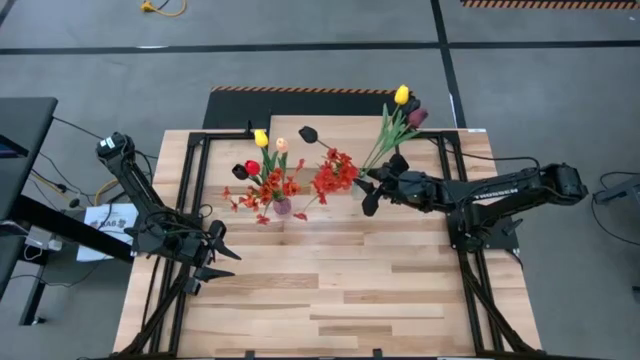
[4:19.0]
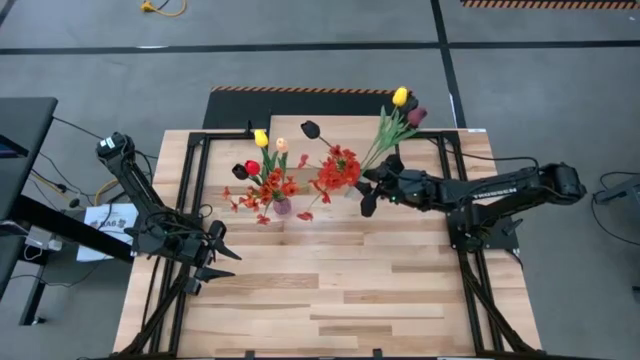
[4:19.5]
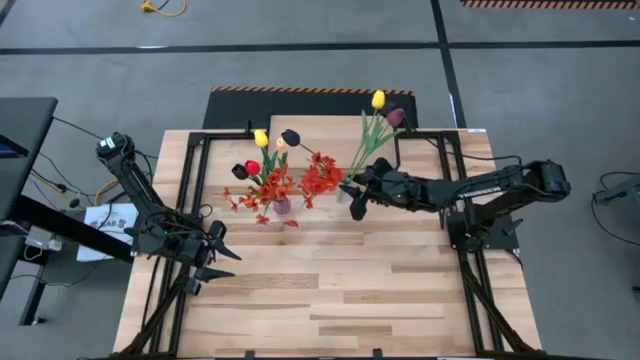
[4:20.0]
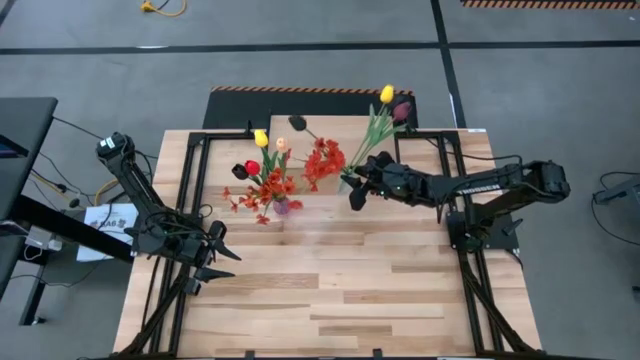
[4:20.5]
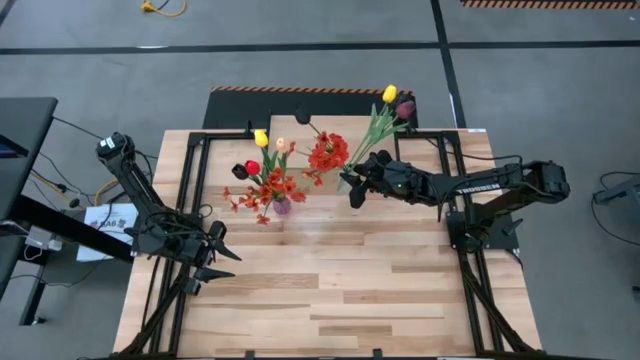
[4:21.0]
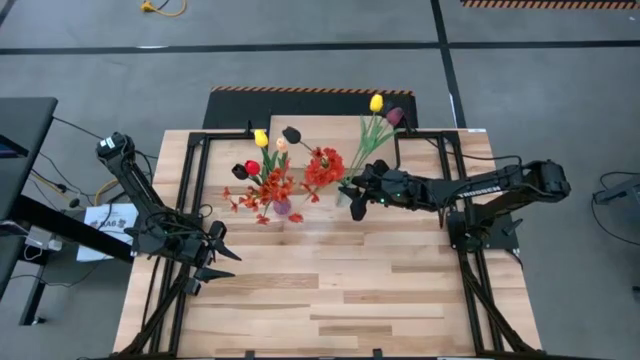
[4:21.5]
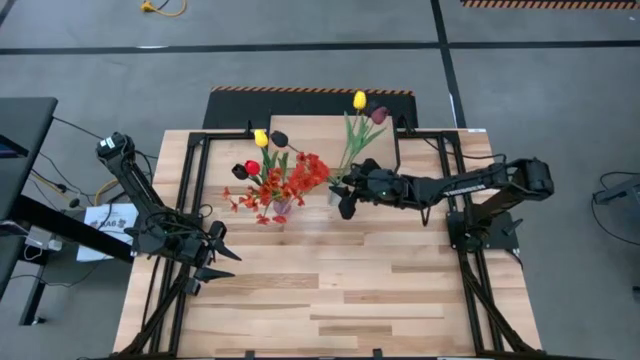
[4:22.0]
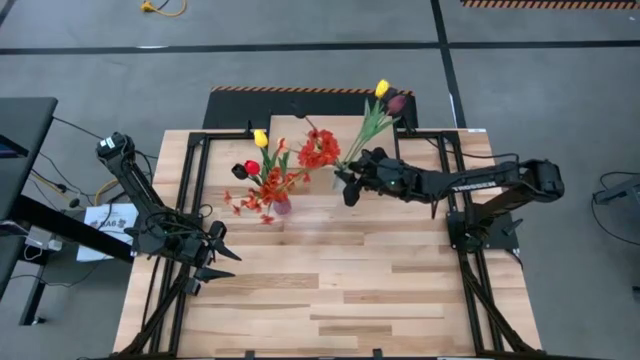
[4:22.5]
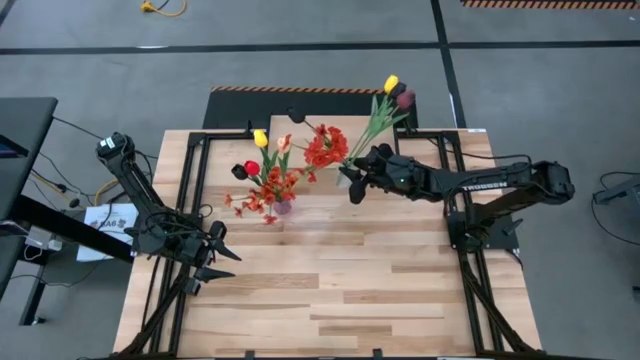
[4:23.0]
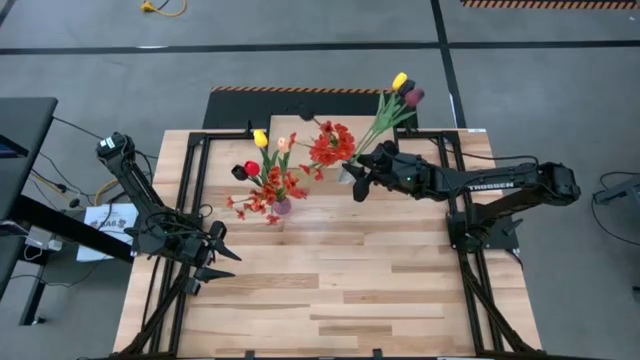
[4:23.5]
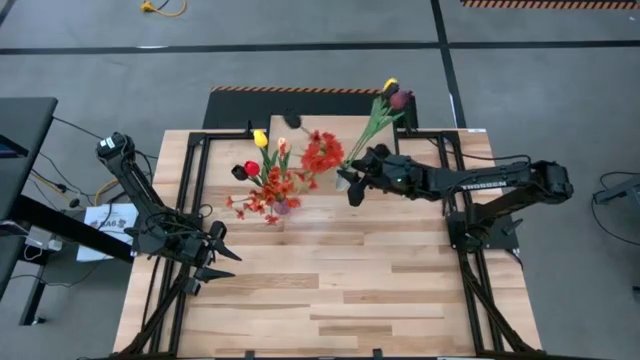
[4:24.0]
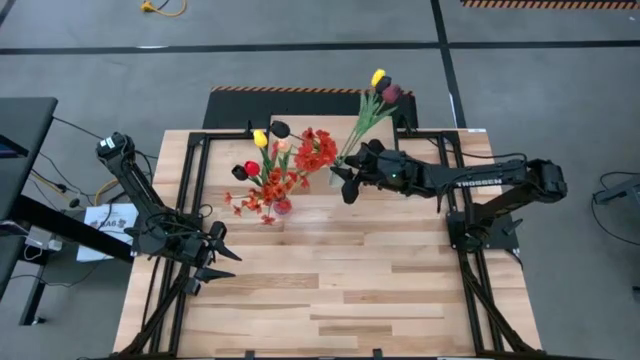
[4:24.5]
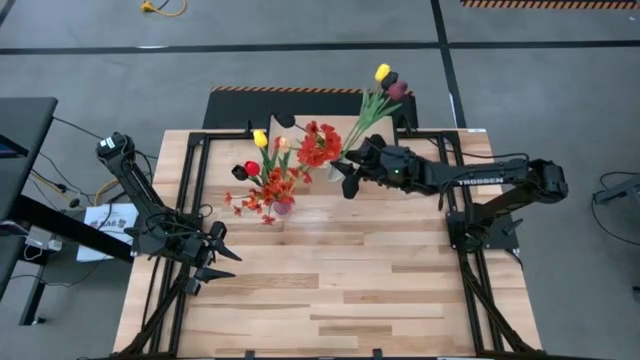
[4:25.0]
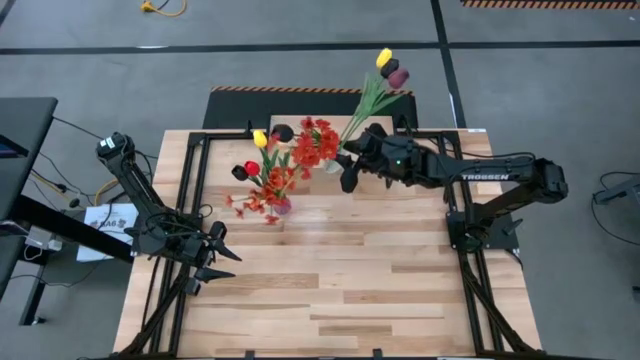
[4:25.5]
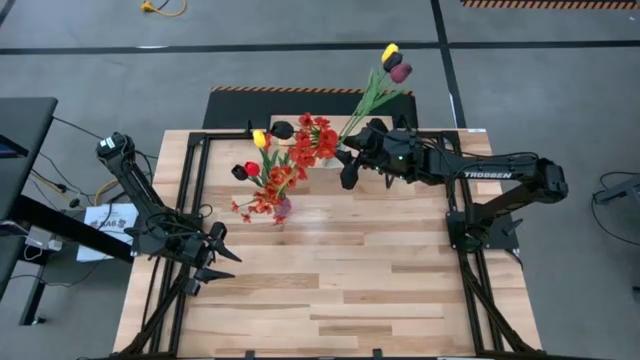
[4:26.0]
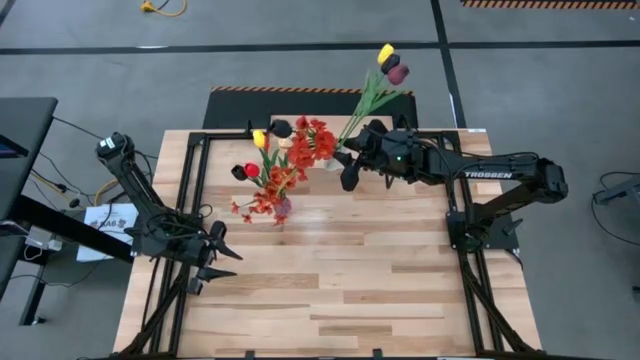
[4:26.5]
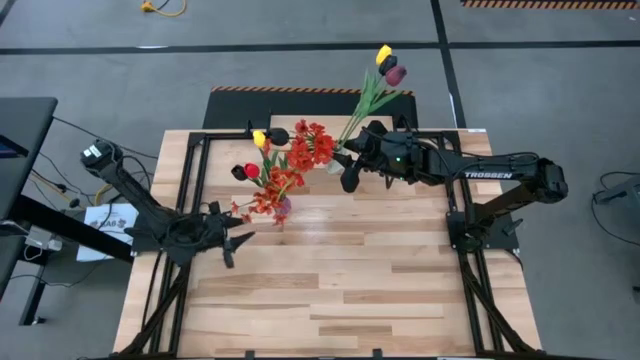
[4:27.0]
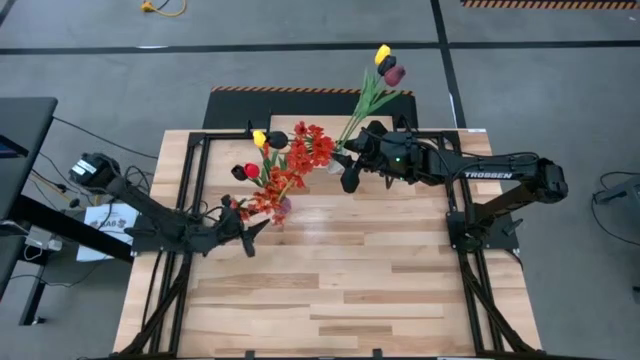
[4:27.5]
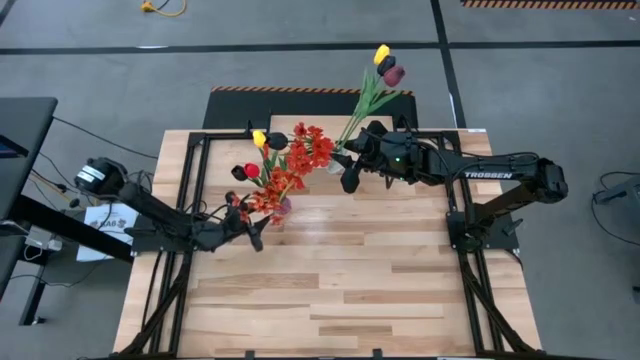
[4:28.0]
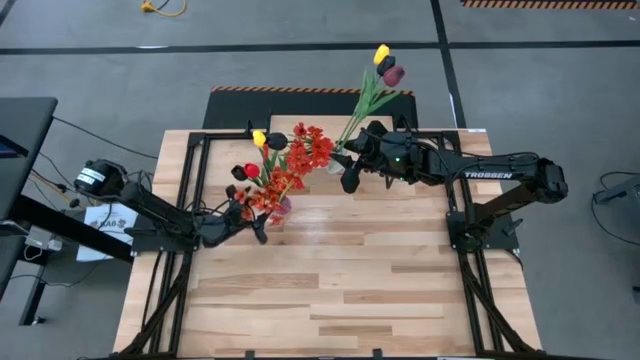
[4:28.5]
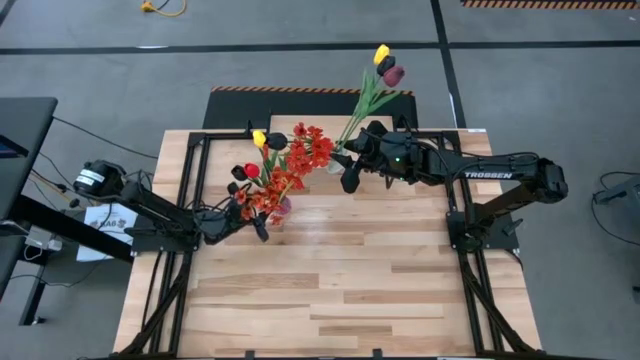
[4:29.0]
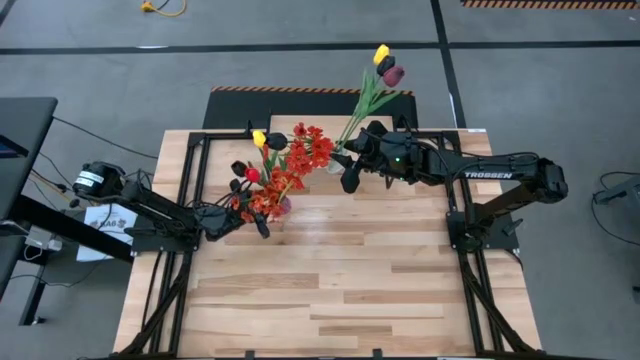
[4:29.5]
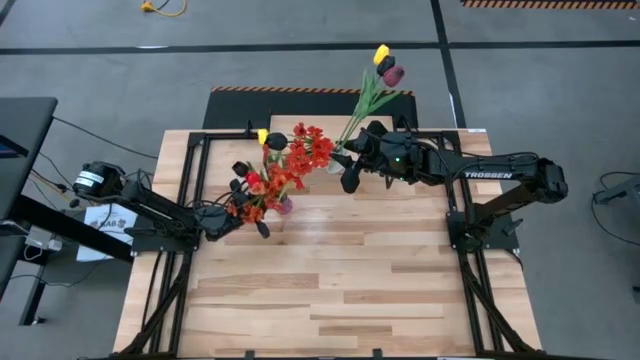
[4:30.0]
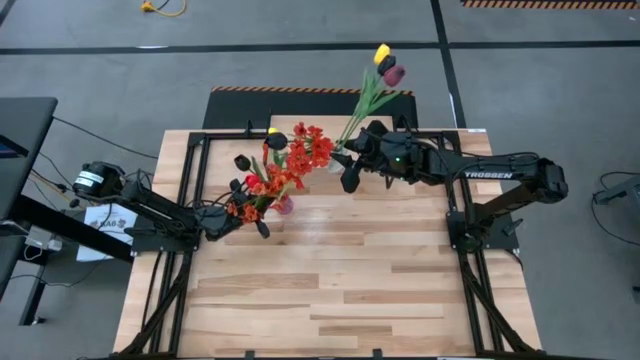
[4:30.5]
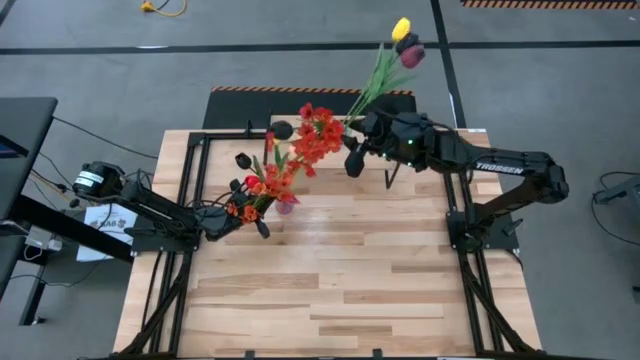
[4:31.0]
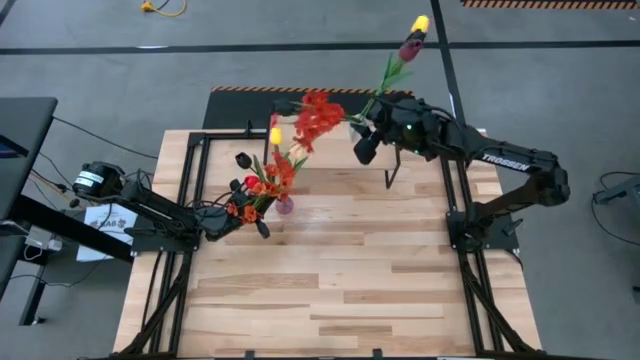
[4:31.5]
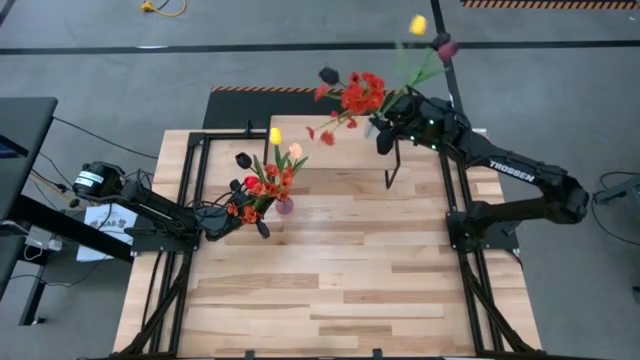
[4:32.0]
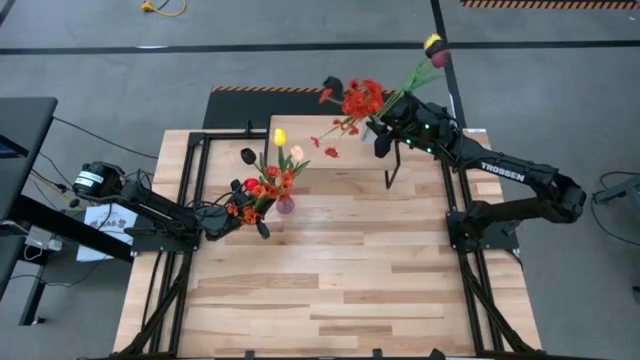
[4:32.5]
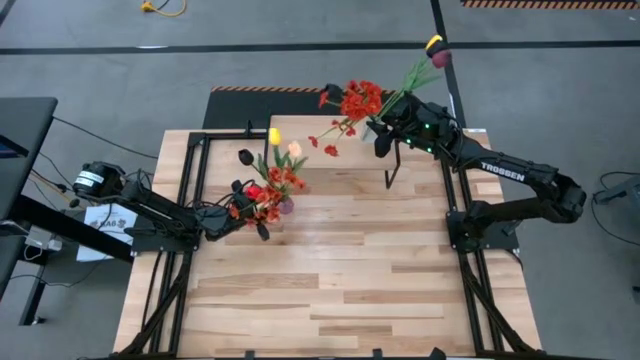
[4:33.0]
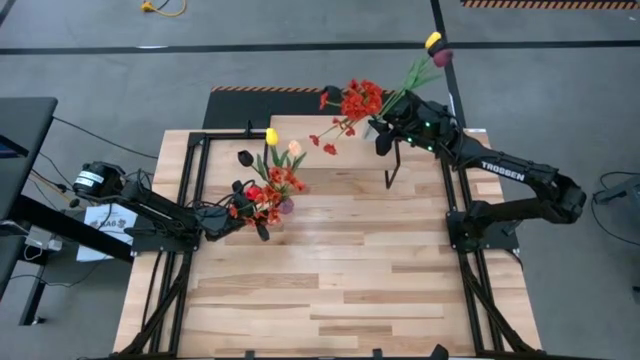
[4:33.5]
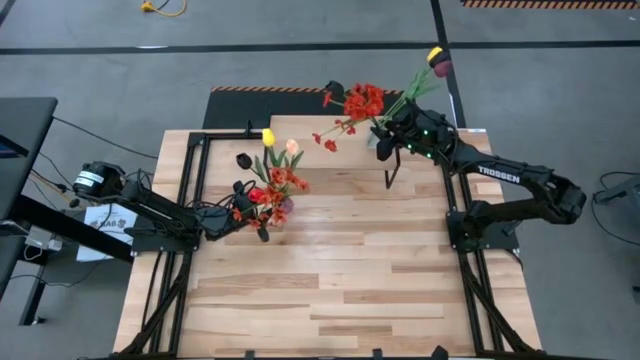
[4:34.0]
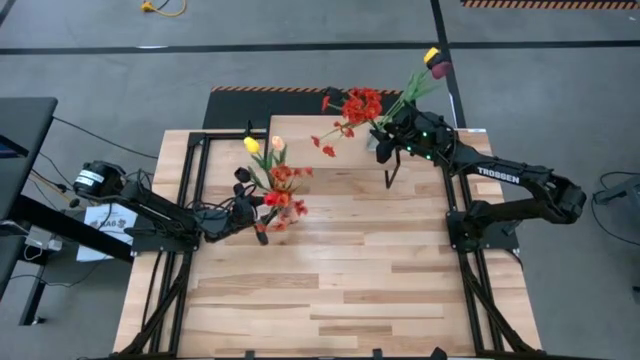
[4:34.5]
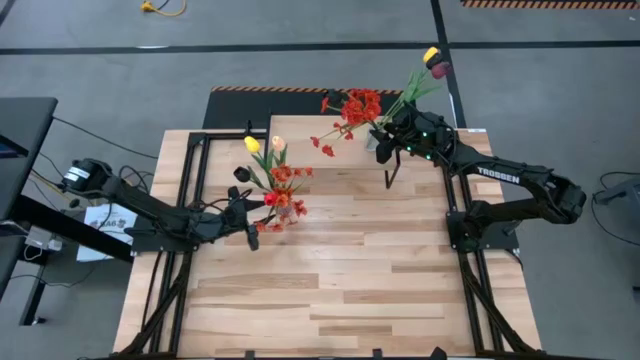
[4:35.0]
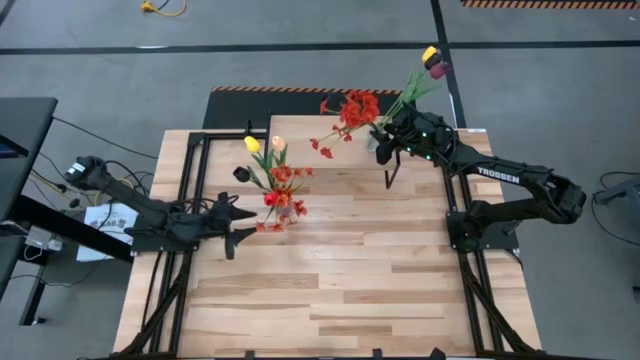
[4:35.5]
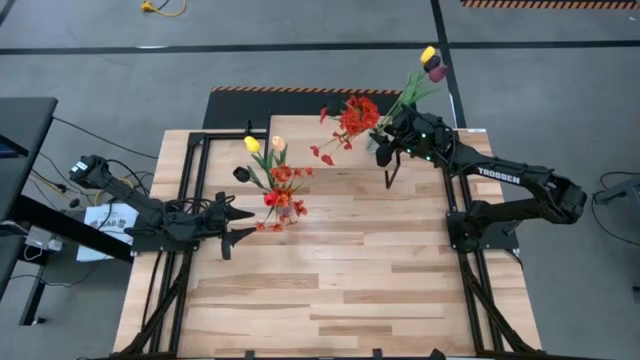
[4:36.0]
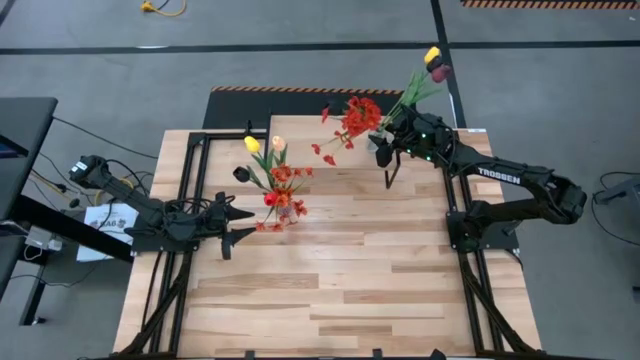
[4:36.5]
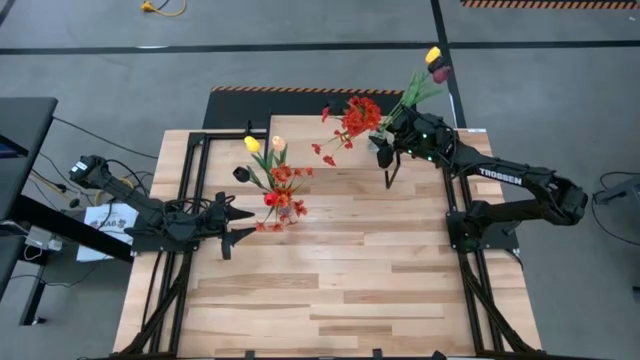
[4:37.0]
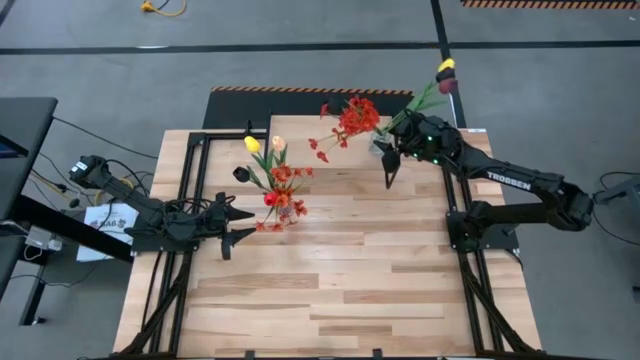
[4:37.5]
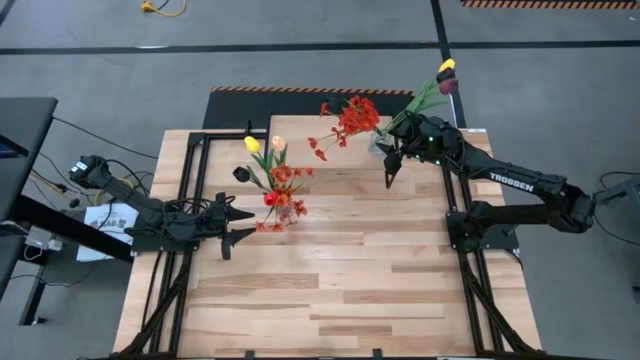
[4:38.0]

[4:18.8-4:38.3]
Task: Pick and place flowers into a vace then onto a shelf
Put the transparent vase with flowers on the shelf
